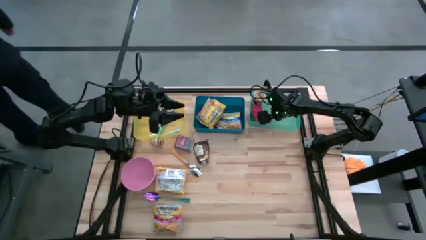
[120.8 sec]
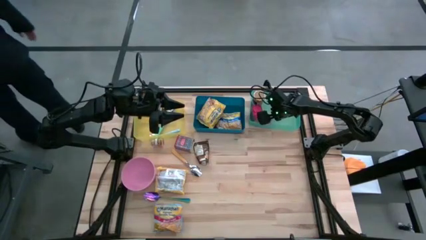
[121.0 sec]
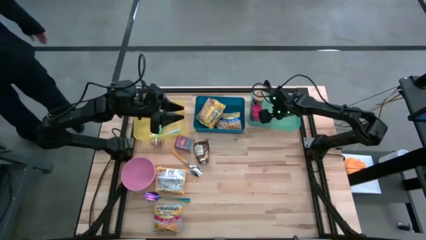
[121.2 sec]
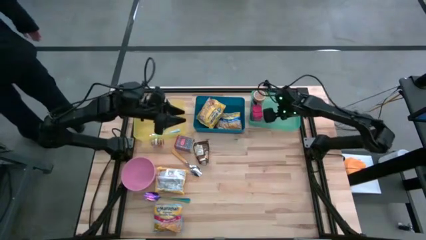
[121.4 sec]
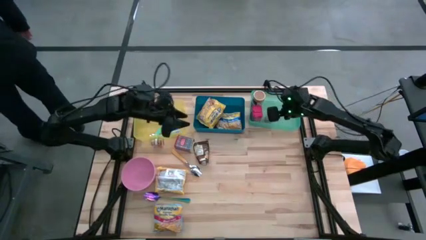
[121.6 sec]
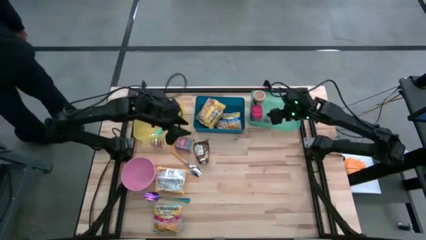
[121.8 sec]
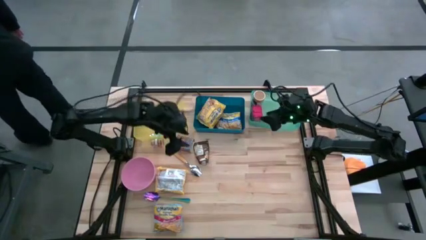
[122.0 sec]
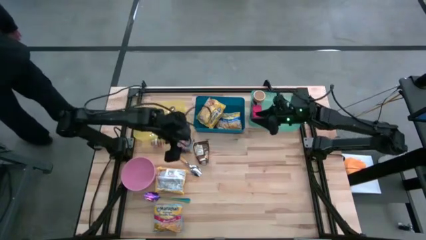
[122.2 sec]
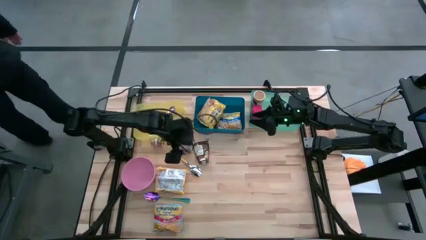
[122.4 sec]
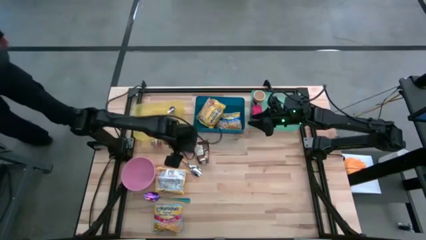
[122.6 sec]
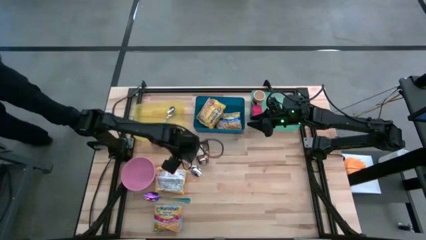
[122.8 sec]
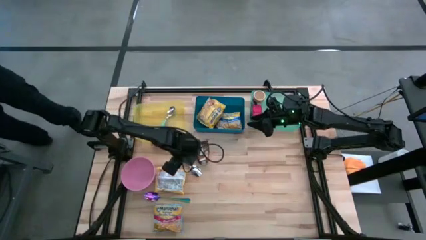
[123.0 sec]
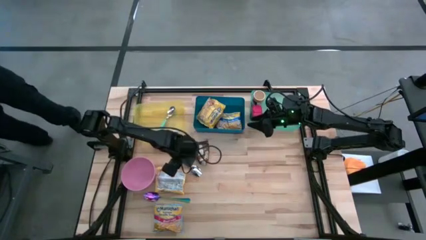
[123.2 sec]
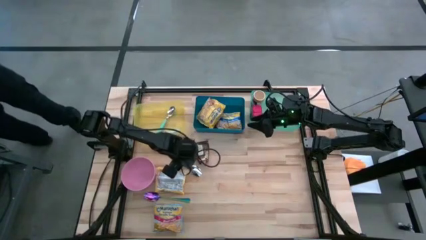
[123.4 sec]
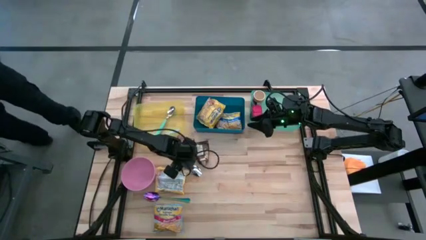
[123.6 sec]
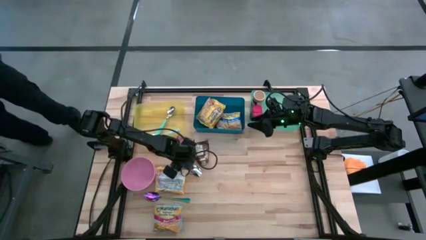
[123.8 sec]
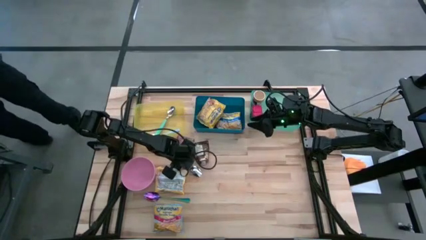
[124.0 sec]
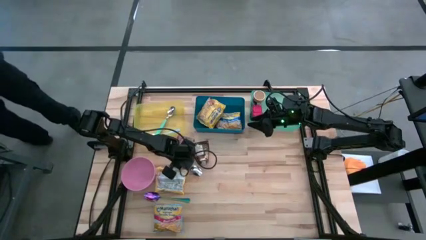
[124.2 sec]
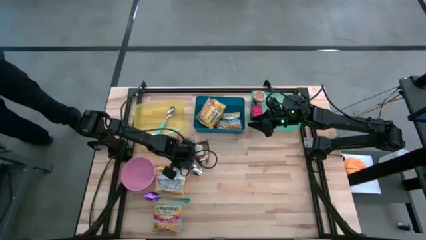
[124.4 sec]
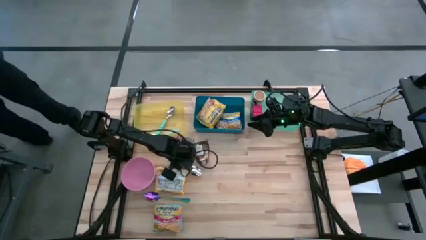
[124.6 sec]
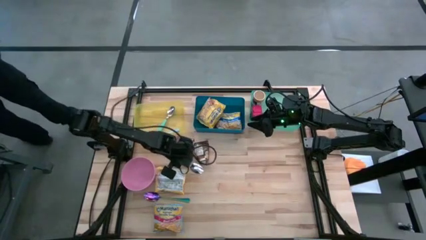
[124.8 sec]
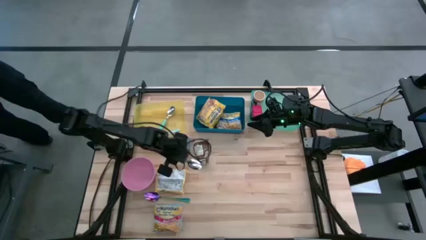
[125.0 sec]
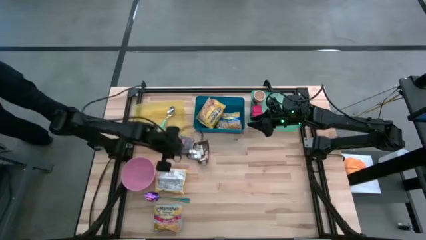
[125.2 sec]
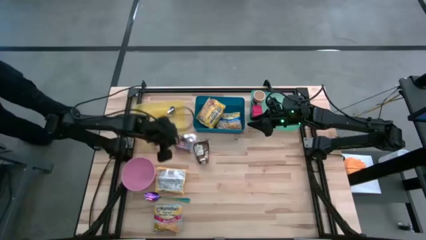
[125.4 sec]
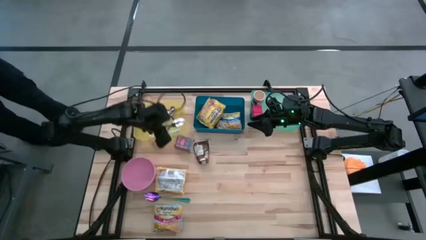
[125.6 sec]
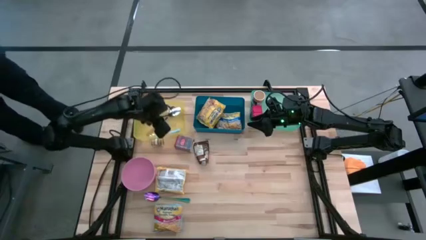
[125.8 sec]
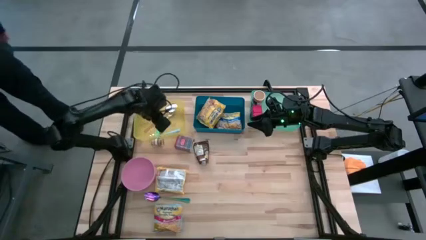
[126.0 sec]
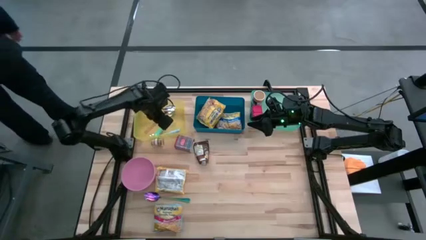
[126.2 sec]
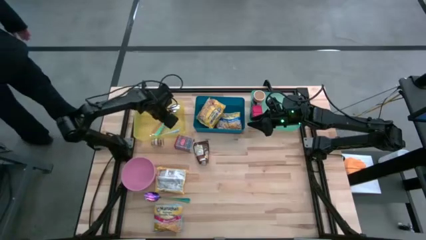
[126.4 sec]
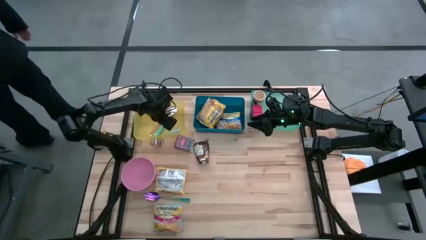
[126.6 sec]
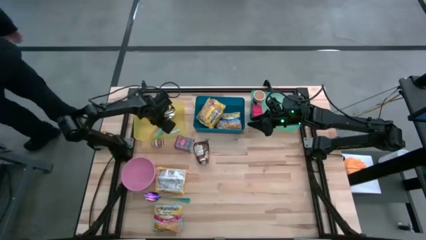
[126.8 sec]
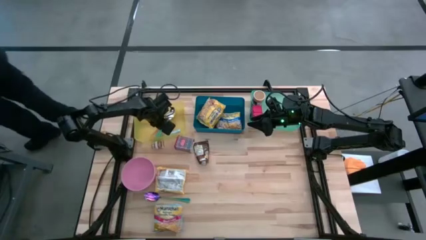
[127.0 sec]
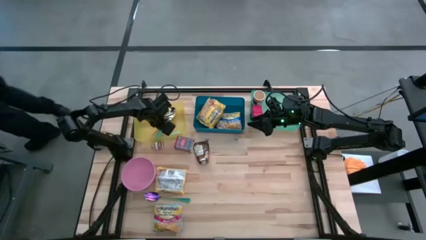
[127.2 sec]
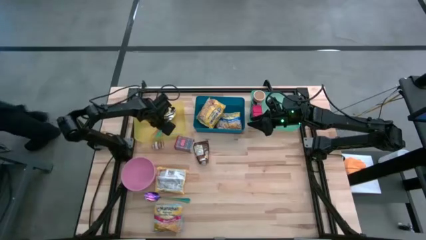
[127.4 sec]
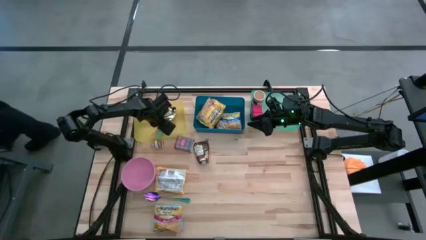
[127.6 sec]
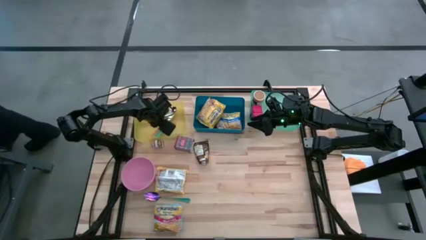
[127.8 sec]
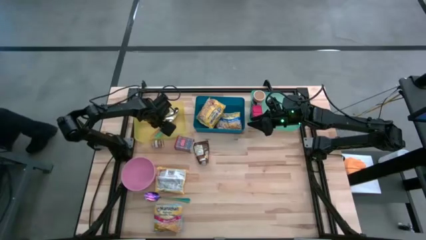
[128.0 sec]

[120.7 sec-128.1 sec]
Put the yellow spoon into the yellow transparent bin

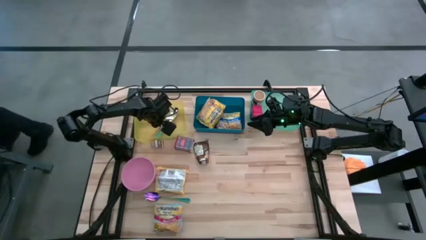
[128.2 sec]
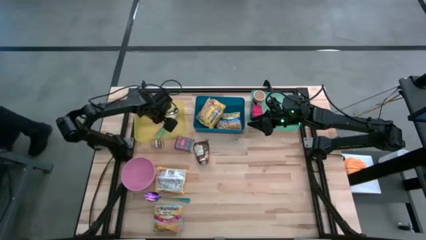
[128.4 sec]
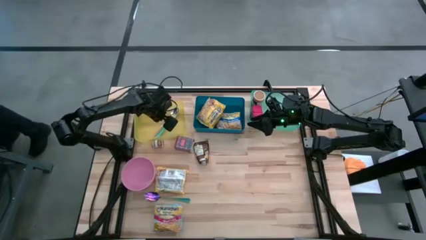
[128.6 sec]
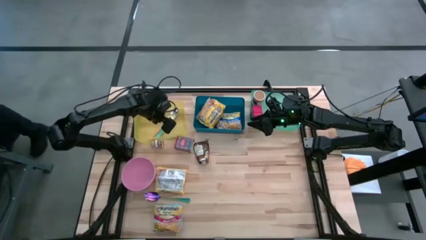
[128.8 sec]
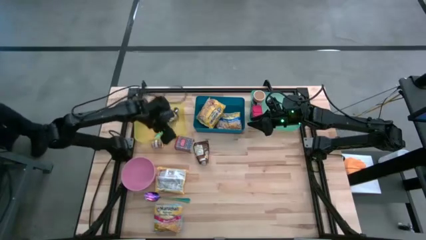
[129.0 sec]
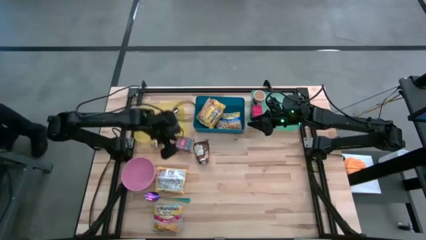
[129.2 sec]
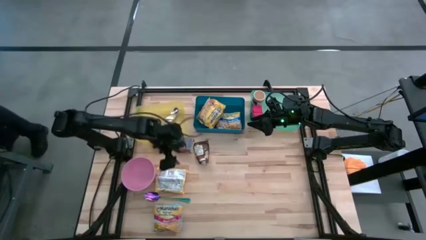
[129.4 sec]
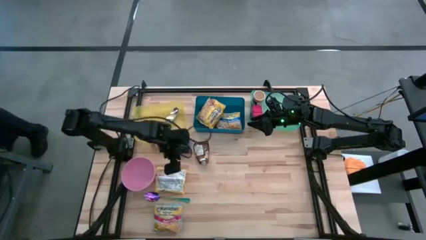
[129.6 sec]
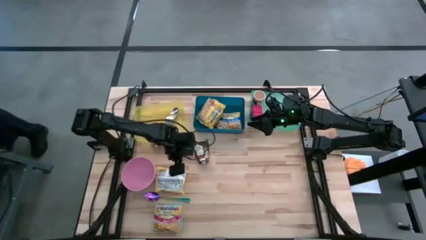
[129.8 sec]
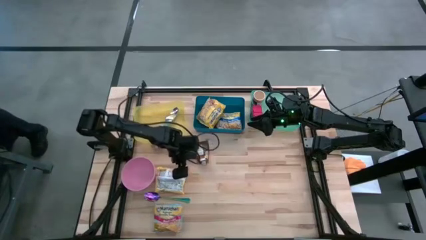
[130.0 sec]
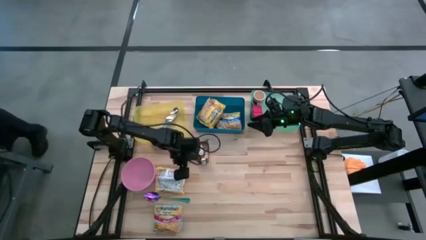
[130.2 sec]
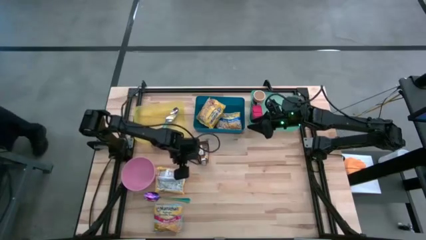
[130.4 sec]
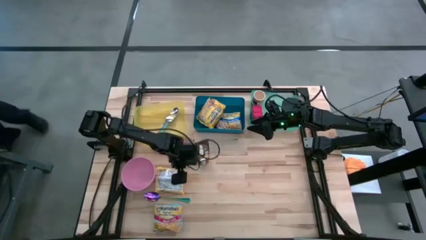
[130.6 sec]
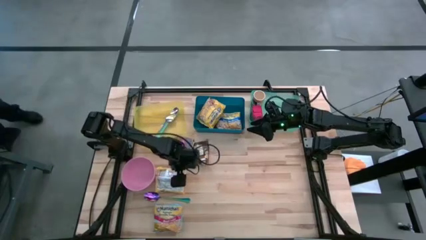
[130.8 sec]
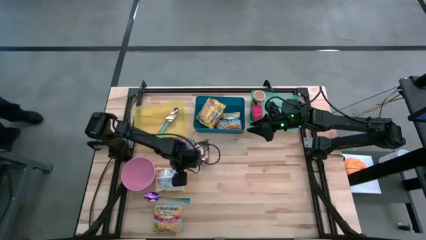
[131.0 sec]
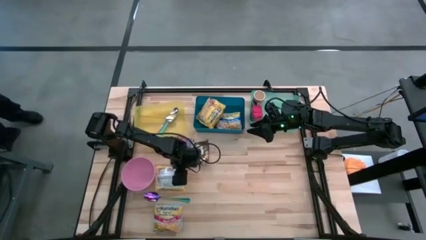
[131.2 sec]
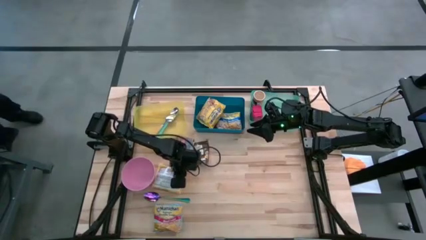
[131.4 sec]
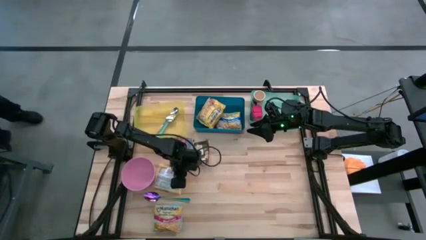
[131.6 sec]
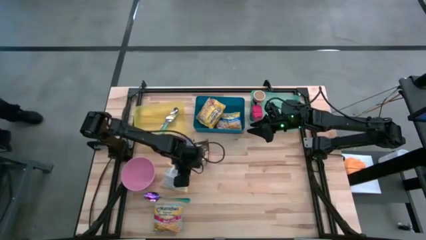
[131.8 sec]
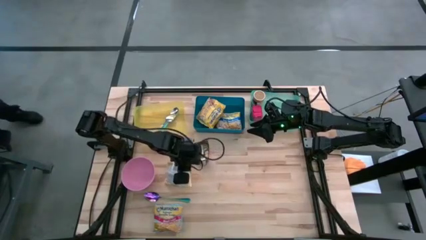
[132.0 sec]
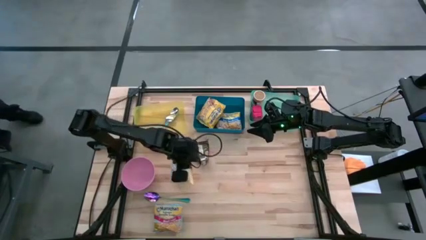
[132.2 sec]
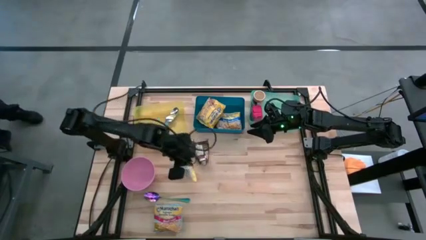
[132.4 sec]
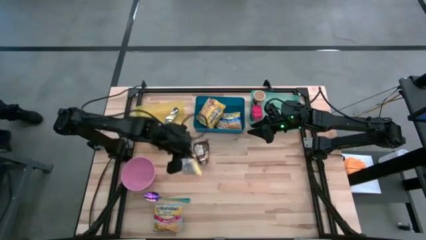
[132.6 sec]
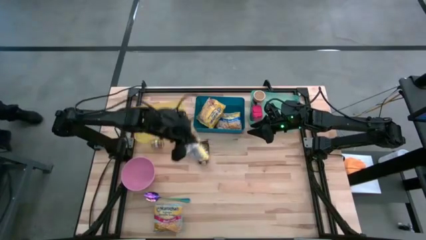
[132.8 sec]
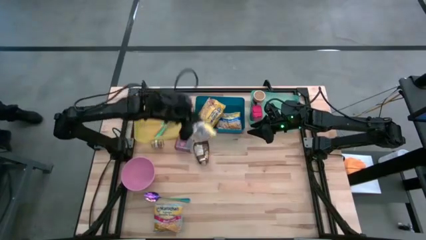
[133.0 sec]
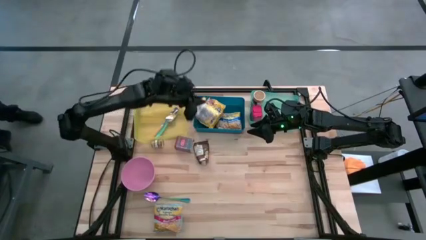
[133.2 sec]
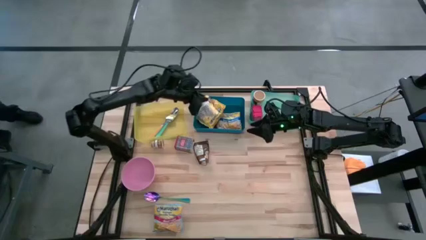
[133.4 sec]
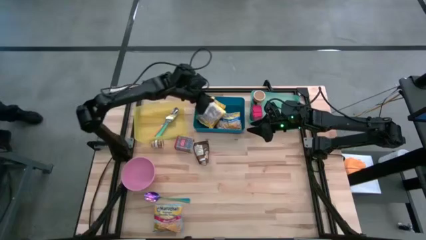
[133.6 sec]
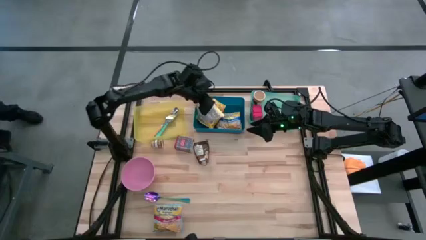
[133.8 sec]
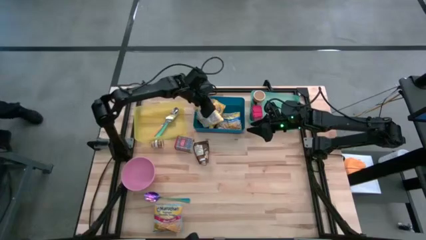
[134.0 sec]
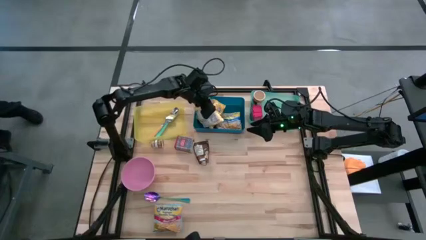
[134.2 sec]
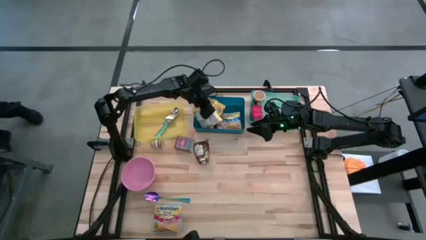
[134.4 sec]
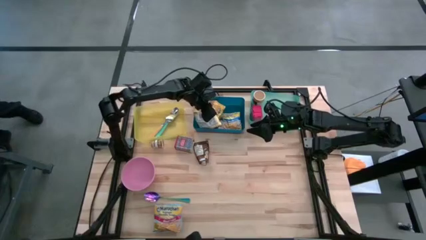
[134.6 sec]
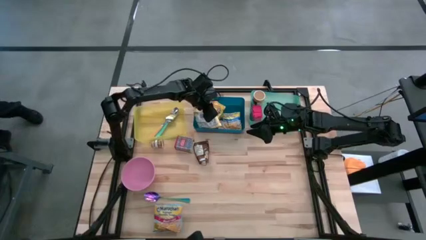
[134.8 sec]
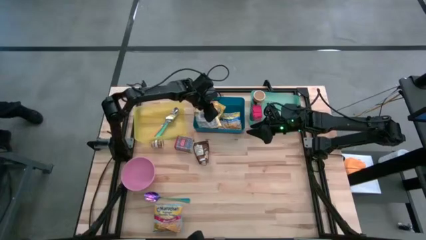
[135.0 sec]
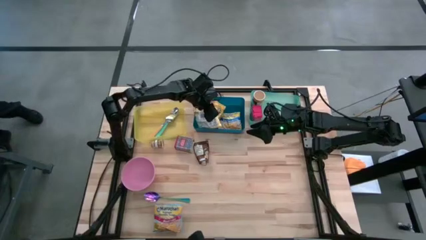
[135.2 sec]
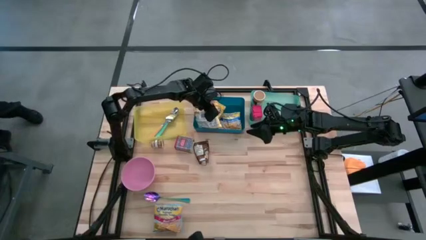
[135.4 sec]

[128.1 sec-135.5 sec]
Put the yellow noodle pack into the blue bin
